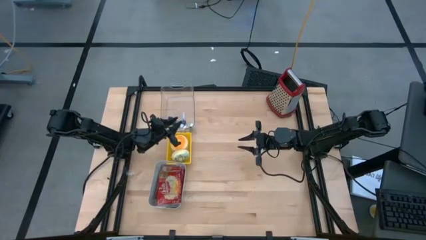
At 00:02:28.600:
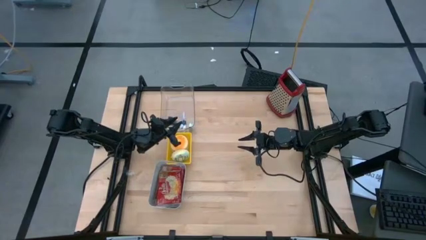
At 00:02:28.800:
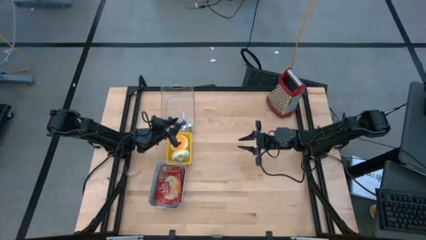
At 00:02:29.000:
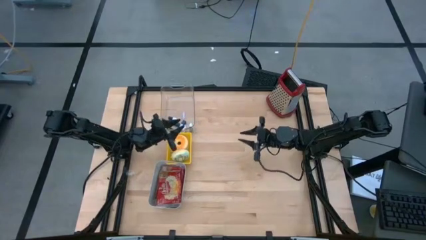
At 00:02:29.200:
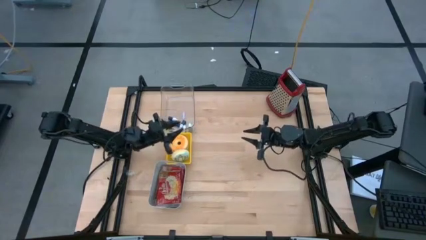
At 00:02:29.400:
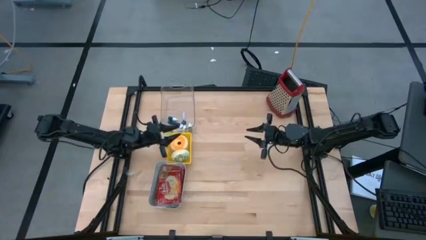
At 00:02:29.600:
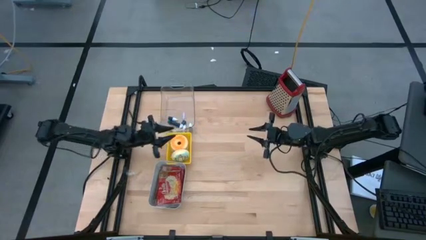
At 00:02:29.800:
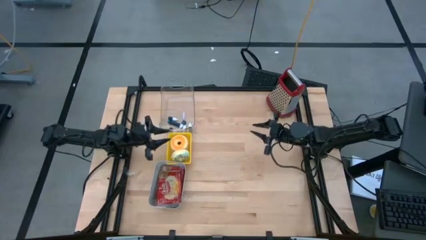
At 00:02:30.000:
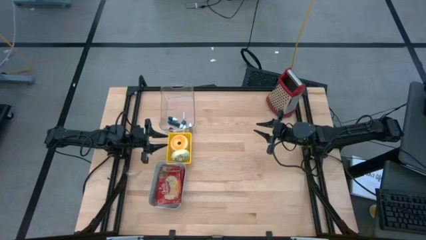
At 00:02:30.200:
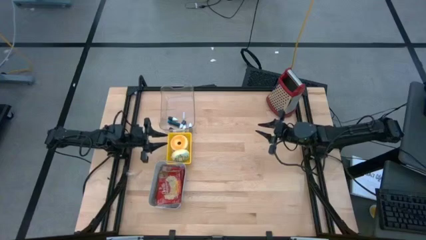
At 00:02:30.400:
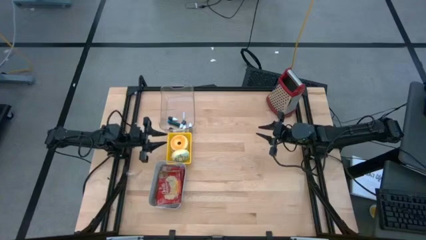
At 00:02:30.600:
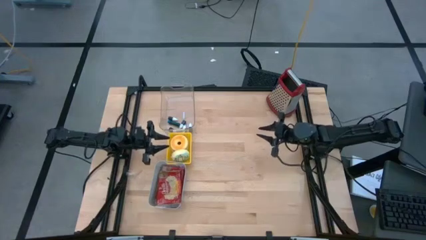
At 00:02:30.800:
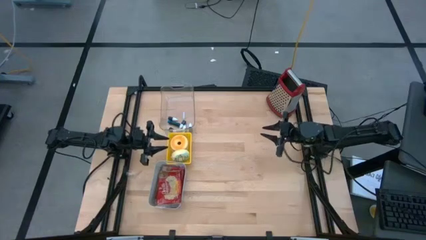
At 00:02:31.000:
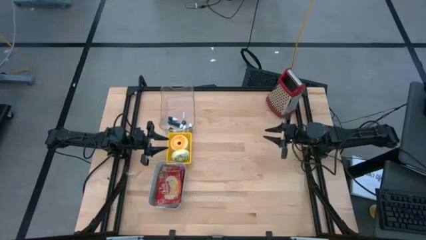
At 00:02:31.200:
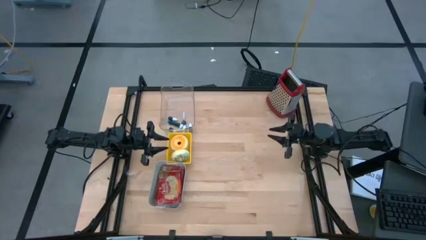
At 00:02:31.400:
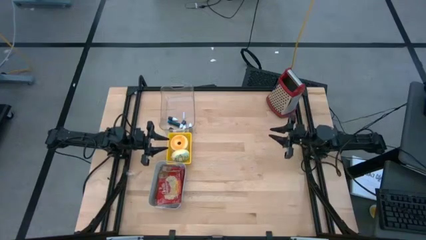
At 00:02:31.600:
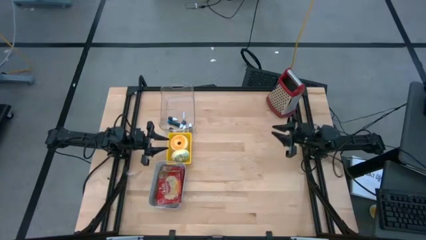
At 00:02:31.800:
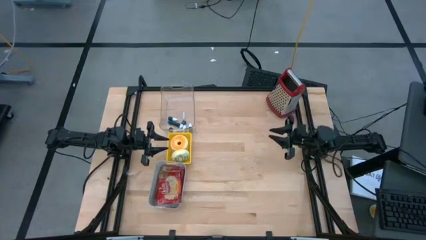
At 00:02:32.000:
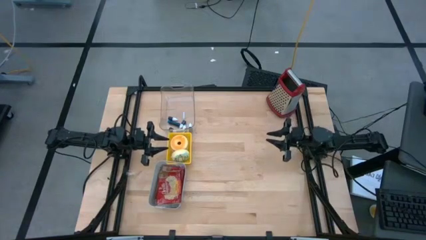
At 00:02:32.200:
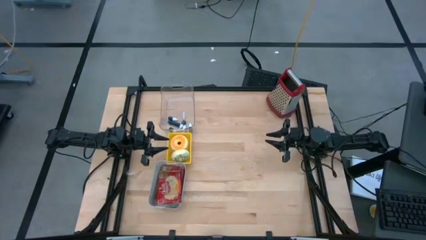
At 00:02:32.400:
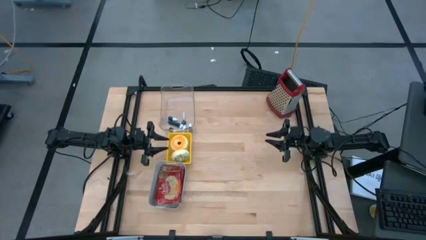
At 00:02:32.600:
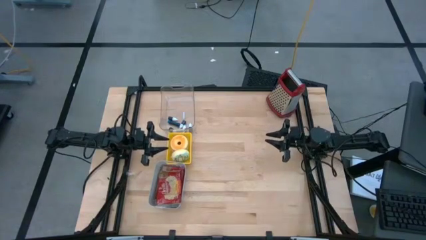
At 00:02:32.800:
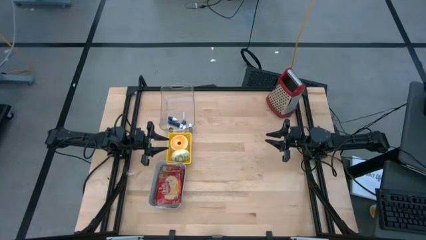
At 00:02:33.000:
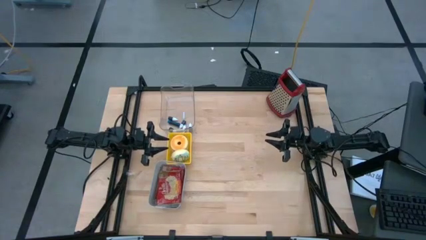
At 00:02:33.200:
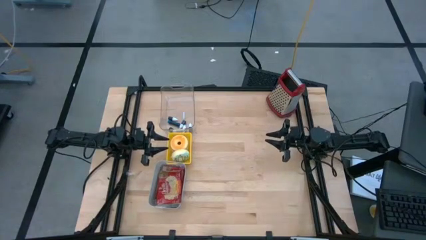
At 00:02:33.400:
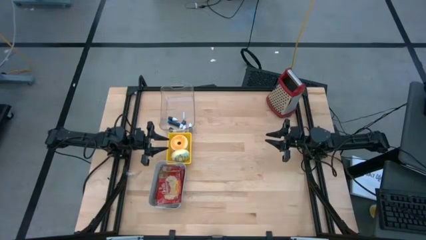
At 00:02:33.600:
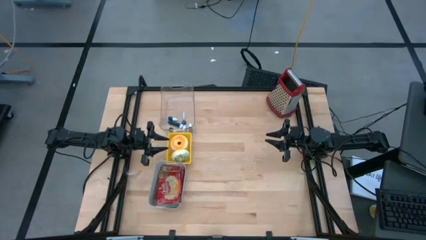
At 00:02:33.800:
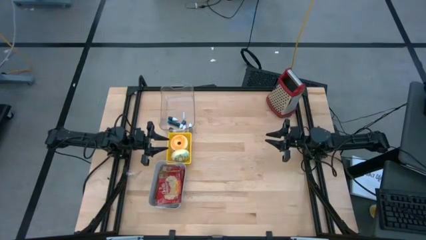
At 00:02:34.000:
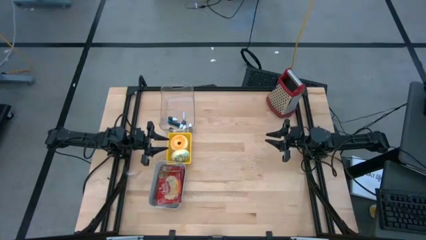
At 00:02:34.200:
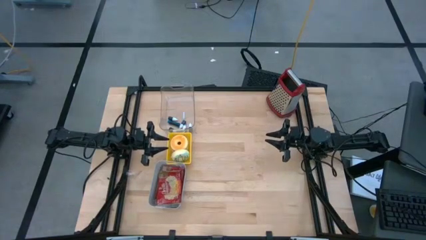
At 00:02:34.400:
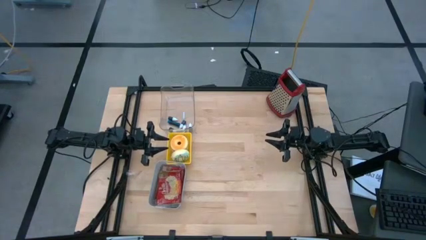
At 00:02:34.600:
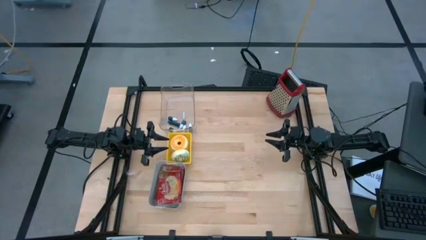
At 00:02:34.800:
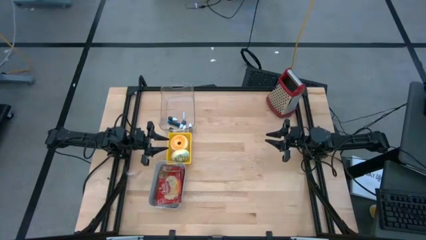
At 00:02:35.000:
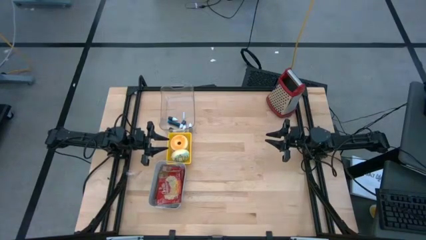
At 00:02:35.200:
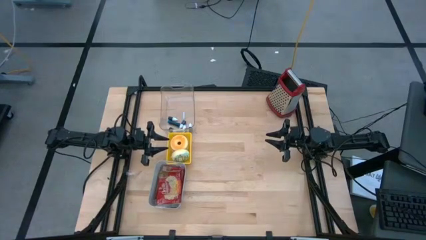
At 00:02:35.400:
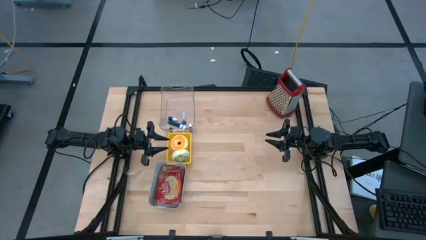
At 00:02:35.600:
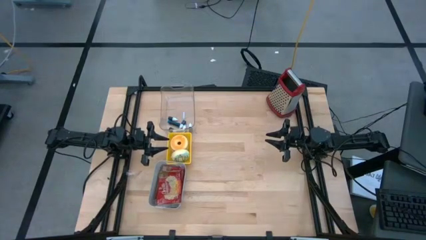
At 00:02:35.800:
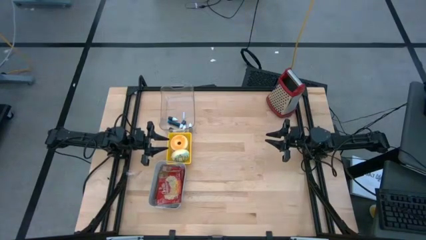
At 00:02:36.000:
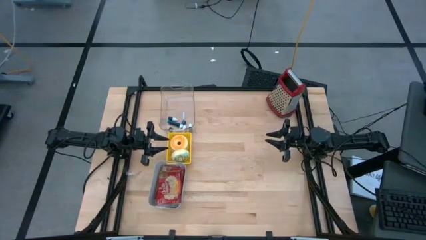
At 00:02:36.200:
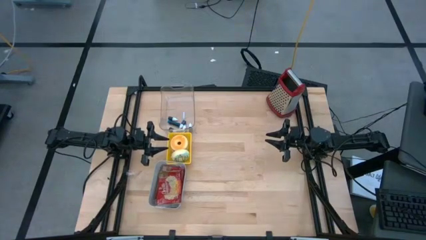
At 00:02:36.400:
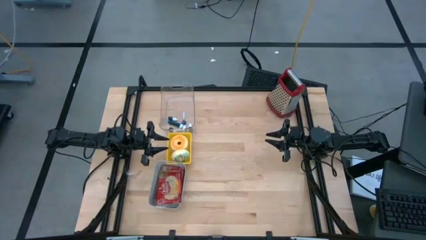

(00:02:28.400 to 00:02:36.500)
Task: Pick & Place Food Item
Return to Home Position

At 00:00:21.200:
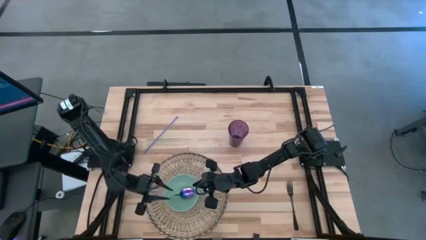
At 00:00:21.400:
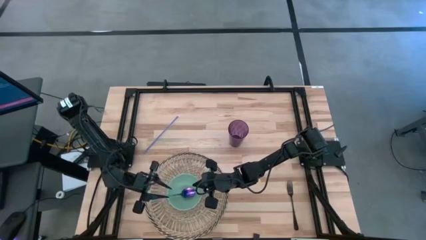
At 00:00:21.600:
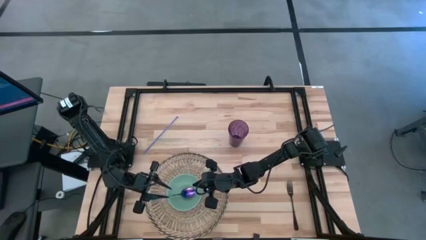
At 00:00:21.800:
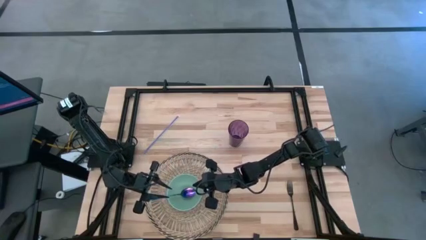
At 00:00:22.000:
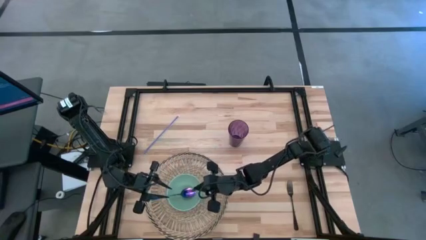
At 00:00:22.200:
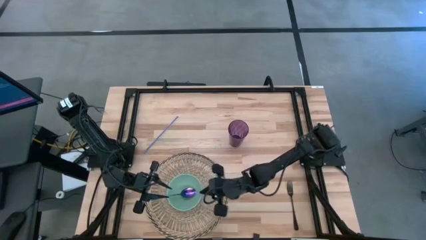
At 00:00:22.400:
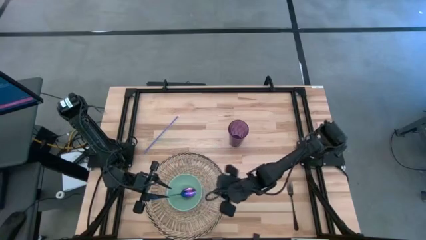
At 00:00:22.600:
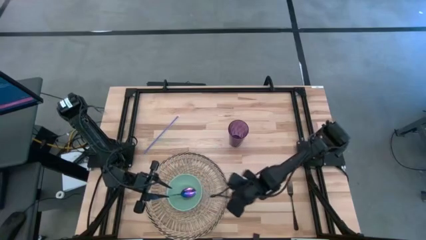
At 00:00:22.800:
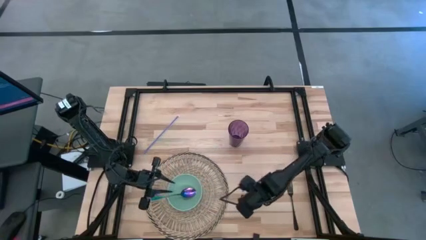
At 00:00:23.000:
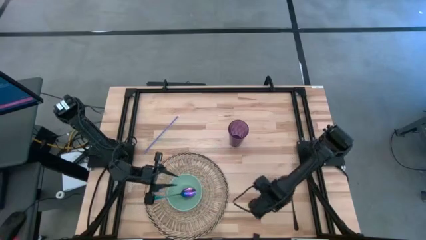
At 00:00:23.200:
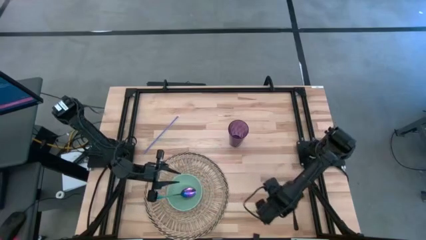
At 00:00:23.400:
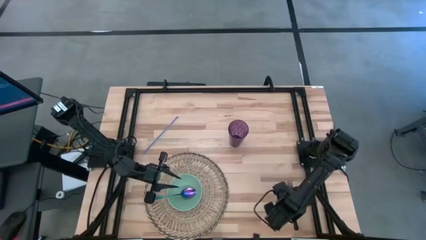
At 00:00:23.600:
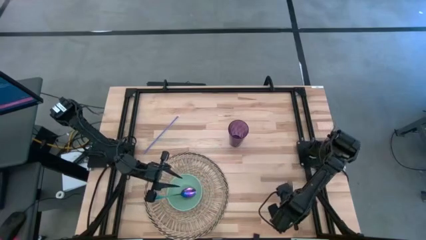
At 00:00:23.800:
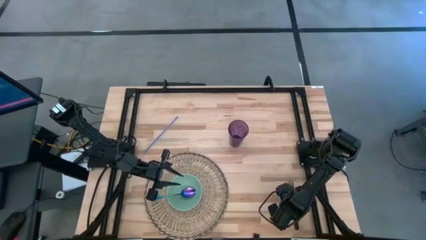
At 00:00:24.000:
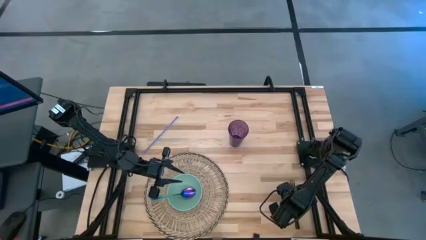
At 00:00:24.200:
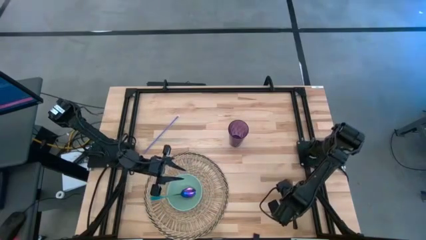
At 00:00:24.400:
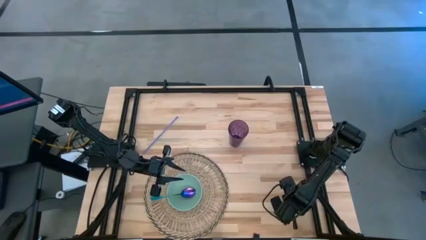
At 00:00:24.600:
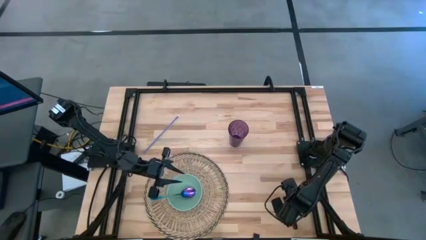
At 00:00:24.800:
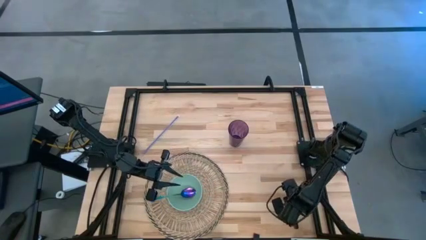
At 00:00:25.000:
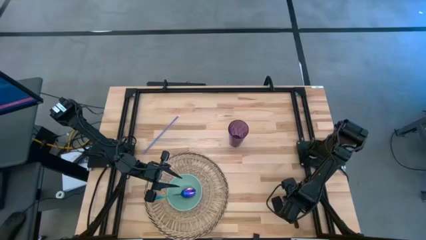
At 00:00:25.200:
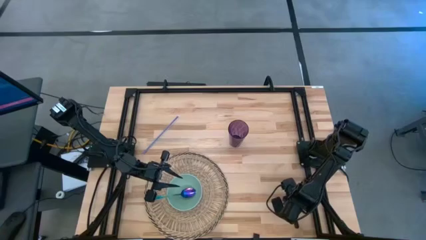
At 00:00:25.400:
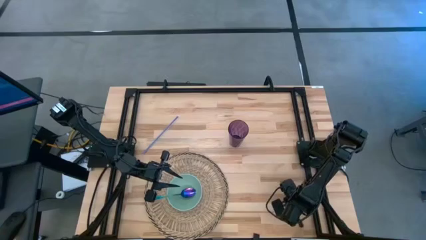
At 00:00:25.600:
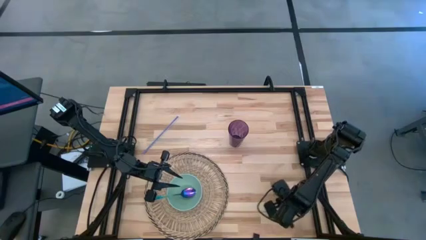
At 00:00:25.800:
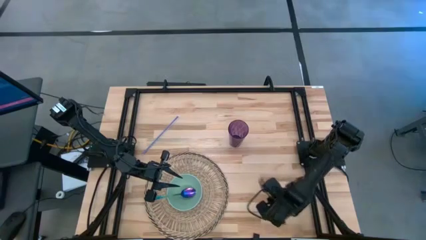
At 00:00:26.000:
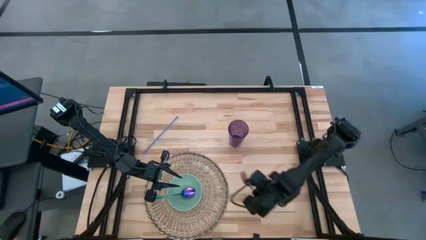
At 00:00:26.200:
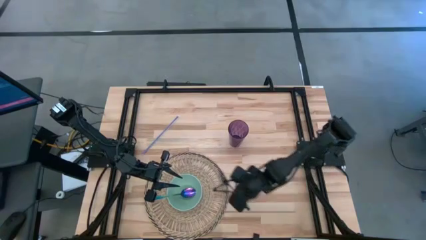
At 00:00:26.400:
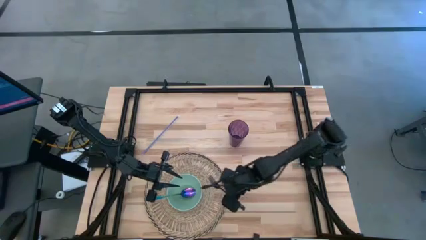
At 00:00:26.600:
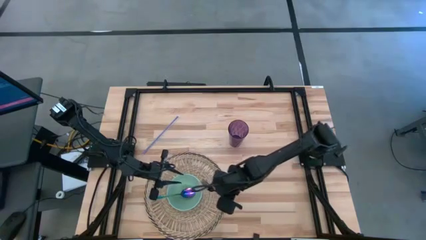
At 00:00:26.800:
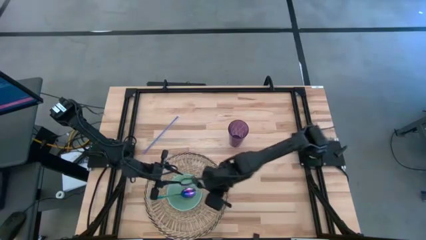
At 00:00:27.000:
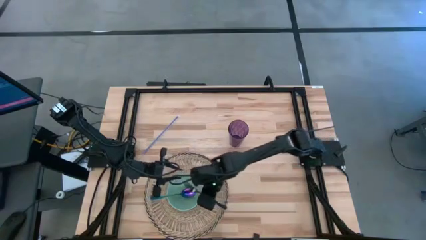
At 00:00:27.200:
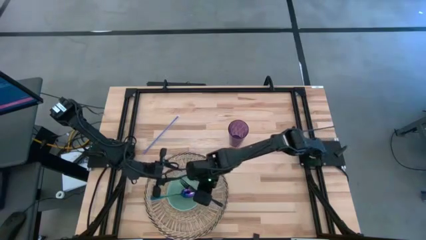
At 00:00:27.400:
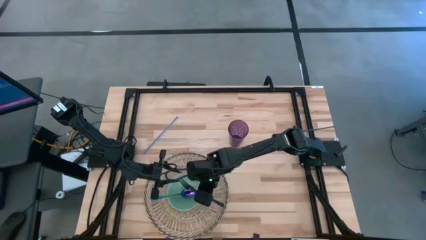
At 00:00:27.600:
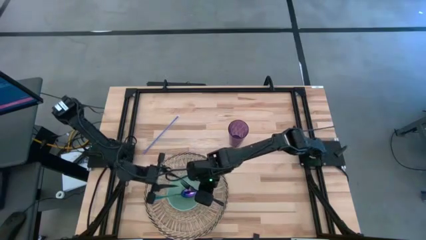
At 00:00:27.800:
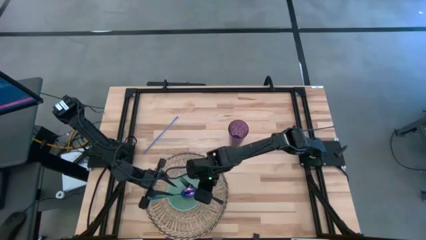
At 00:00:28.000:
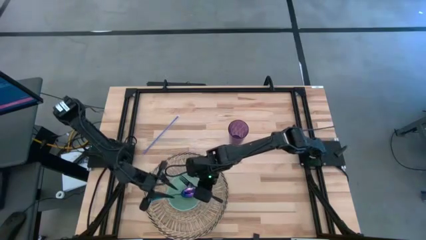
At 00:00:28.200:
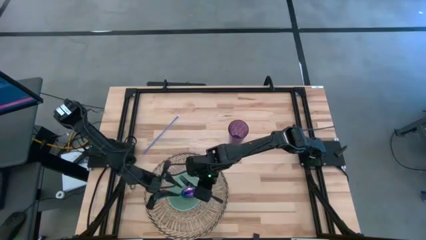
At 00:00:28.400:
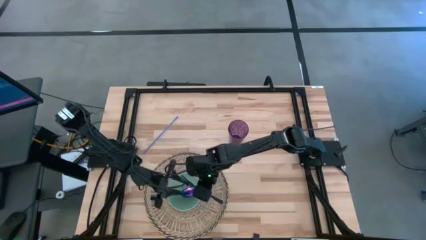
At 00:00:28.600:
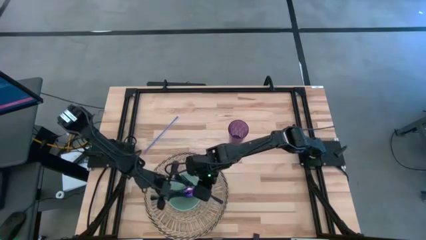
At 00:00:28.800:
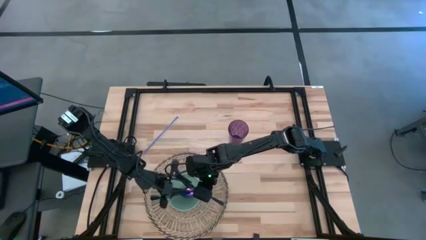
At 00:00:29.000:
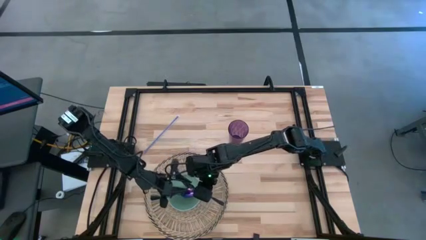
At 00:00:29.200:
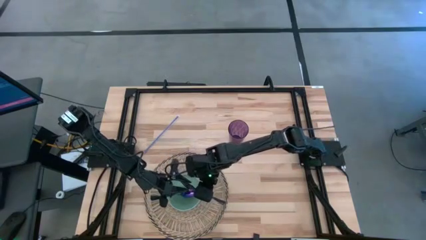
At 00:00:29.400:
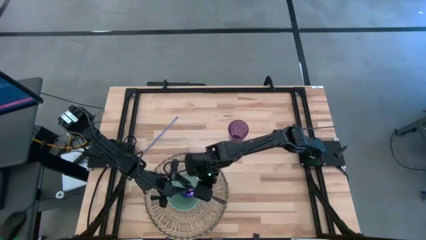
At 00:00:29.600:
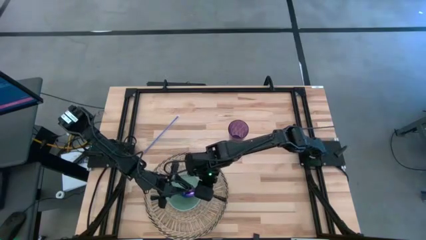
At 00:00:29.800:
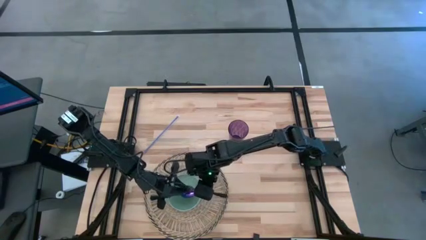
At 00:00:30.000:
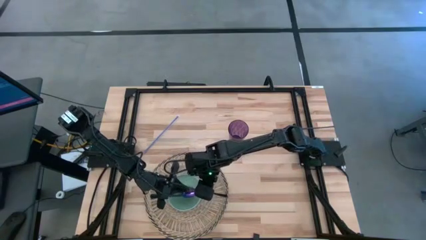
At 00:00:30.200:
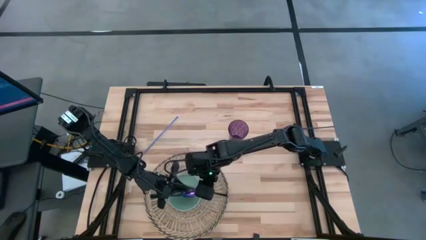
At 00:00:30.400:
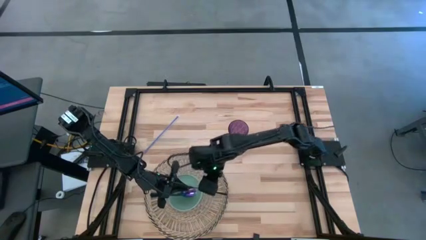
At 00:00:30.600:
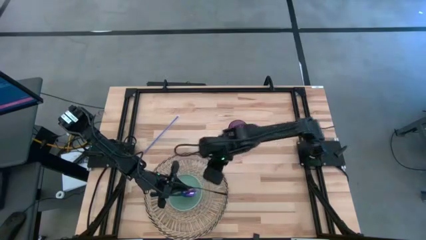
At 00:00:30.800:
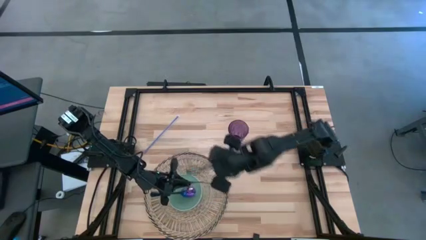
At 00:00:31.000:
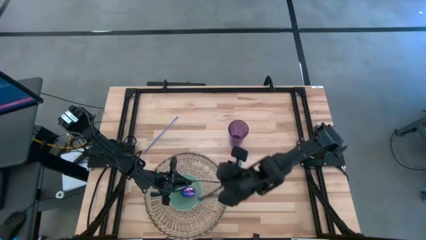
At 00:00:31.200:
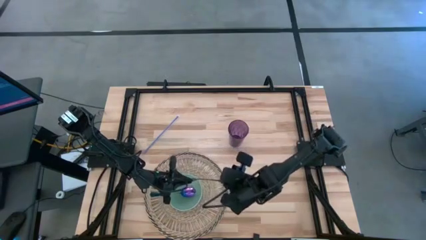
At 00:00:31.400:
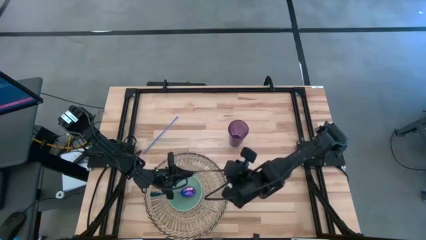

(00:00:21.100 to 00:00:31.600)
Task: Pick & Place Utensil
Put the black fork into the green bowl on the brown mat
